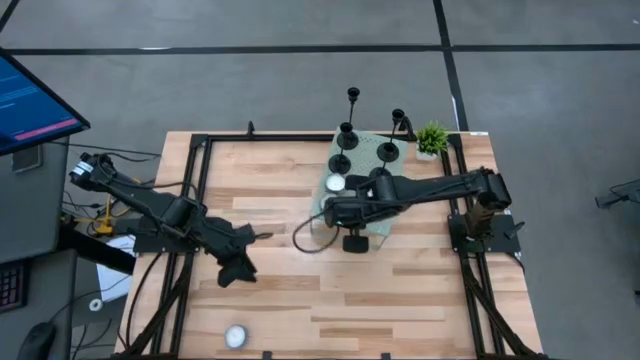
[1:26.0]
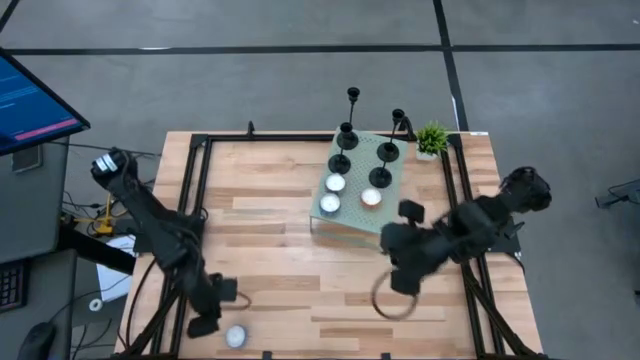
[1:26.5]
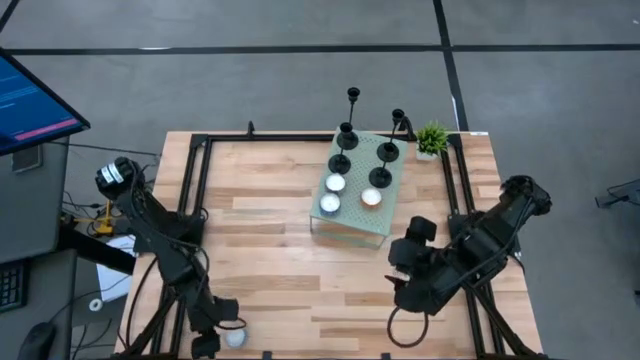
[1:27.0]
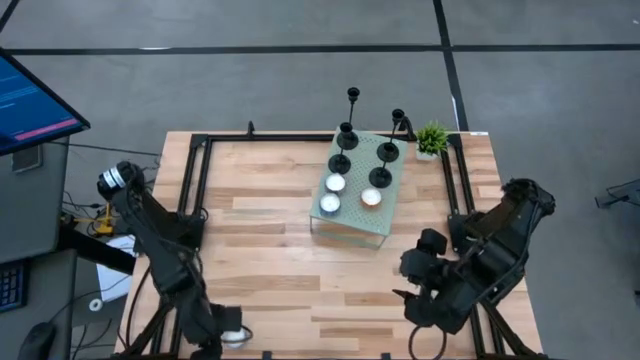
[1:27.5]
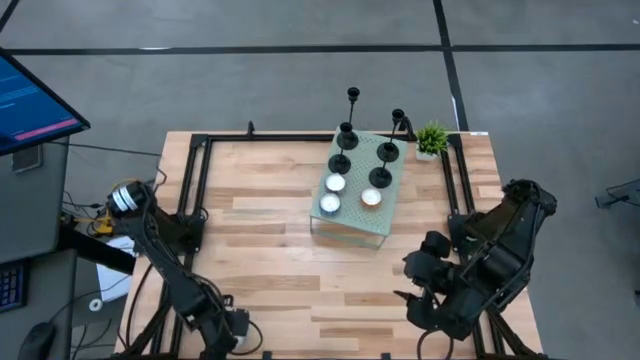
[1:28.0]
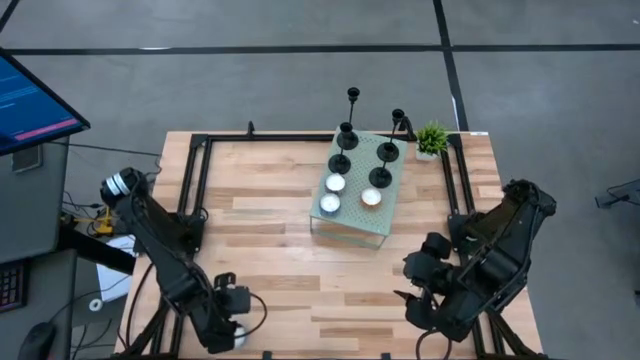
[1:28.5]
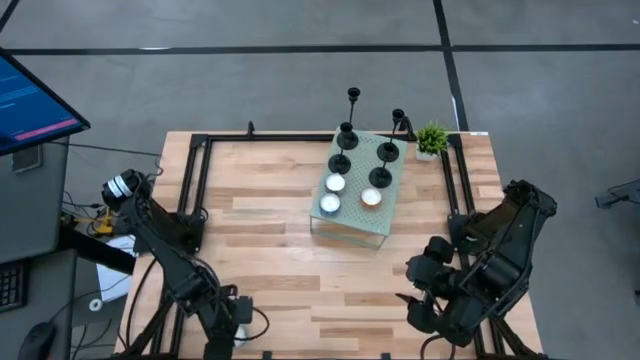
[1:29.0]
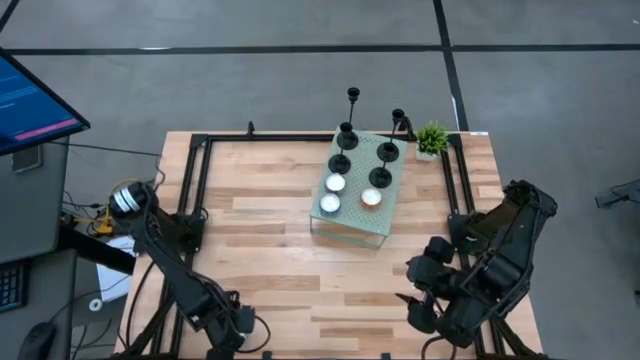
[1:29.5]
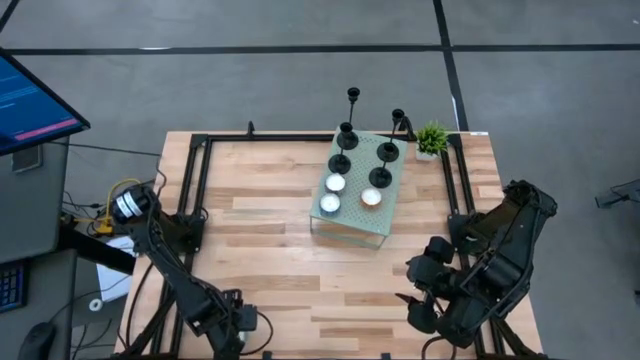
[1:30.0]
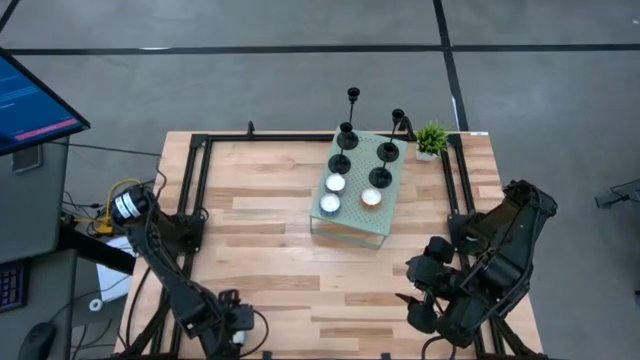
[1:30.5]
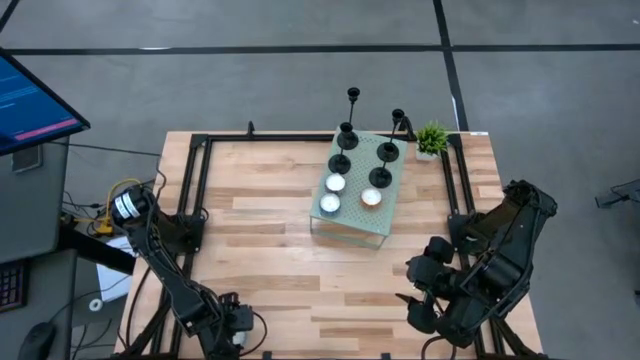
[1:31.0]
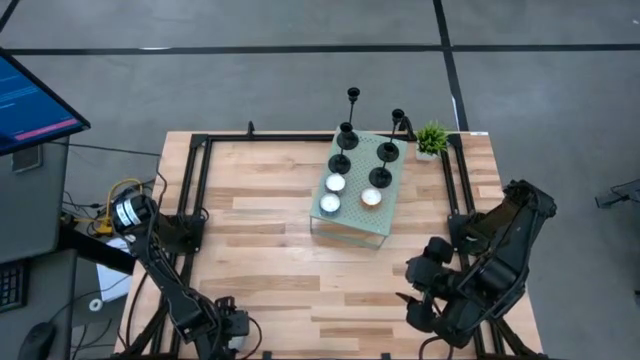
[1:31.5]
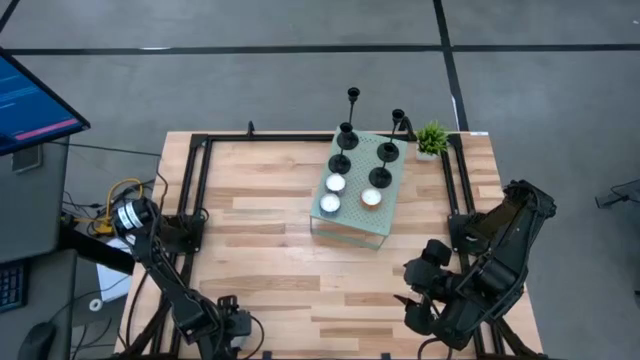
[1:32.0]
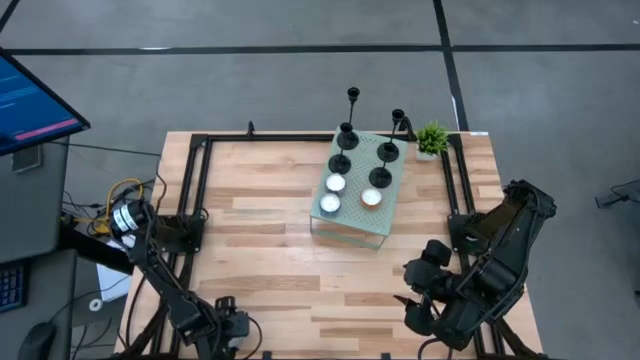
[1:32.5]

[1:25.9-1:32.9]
Task: Pick & Place candle stick holders
Put the light blue patterned scented candle on the shelf

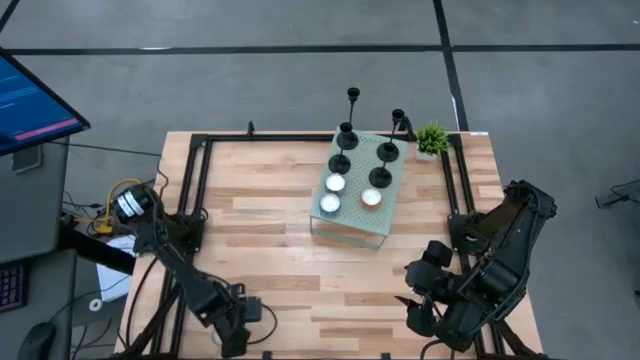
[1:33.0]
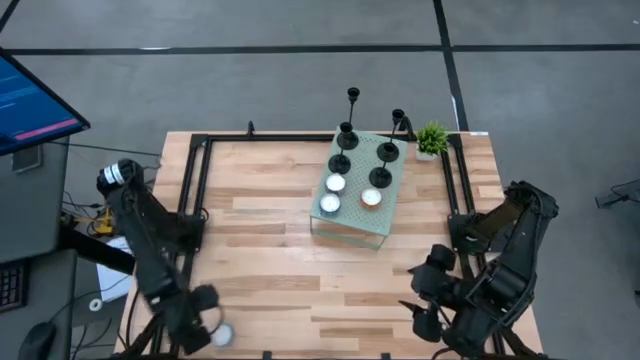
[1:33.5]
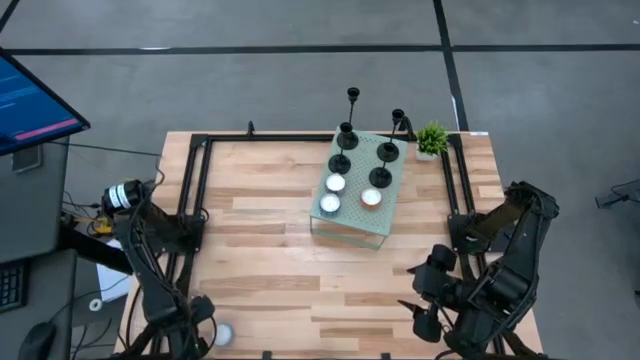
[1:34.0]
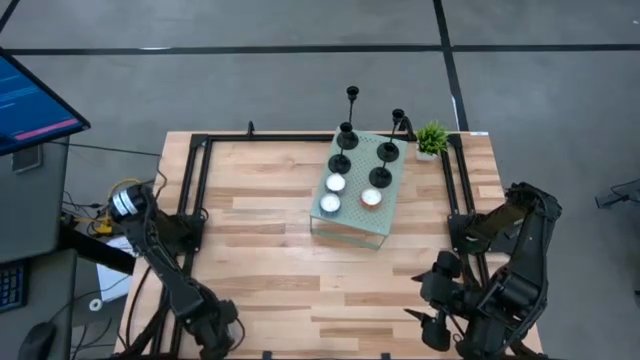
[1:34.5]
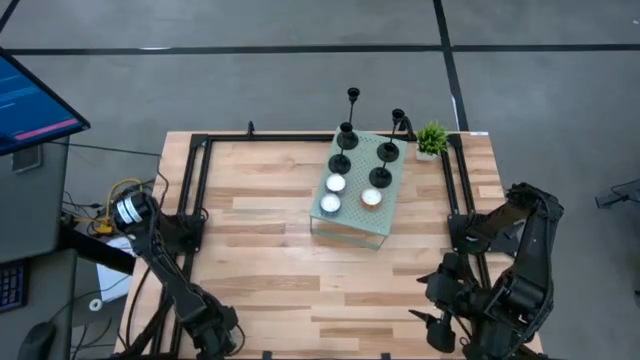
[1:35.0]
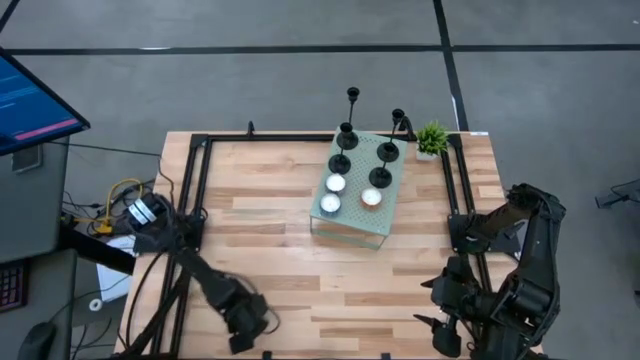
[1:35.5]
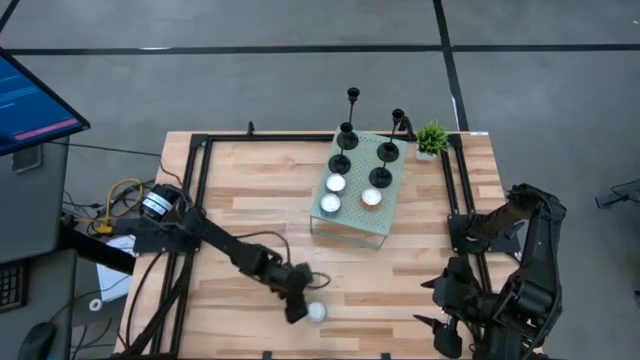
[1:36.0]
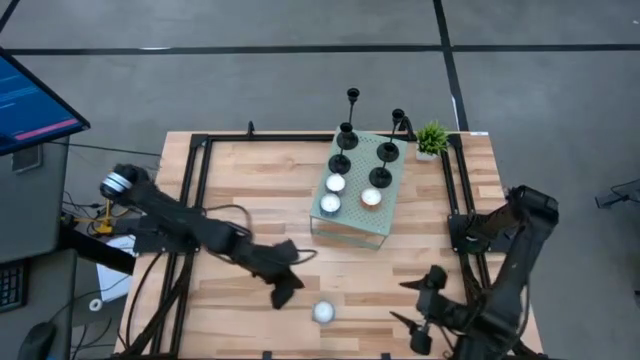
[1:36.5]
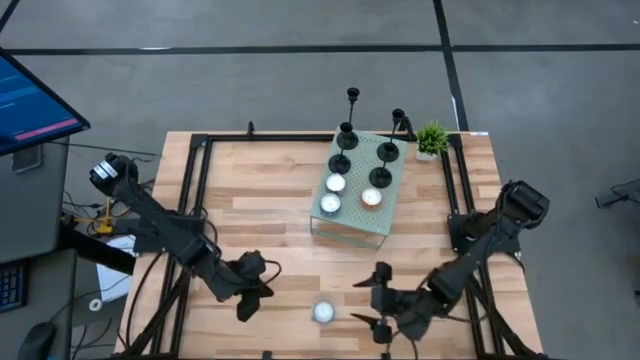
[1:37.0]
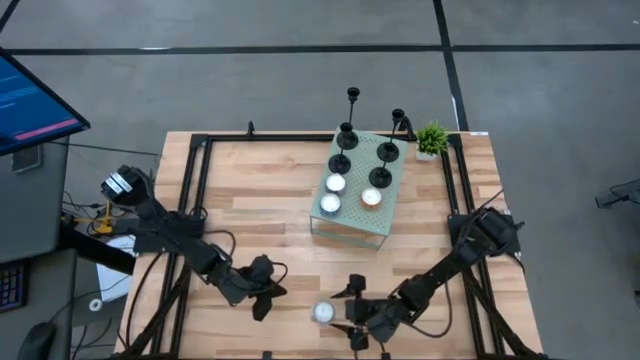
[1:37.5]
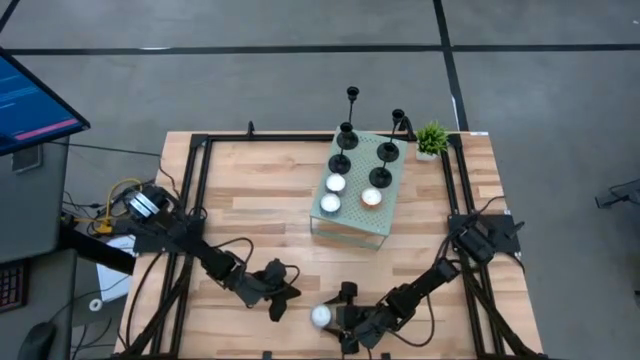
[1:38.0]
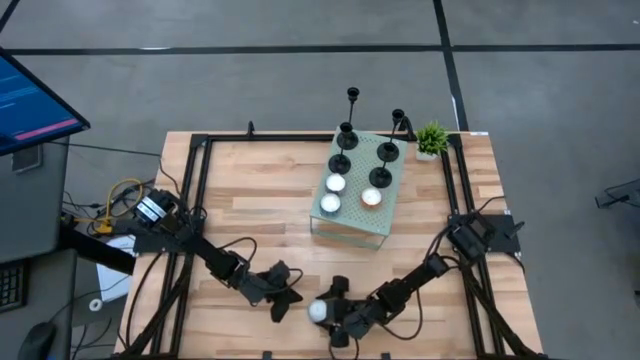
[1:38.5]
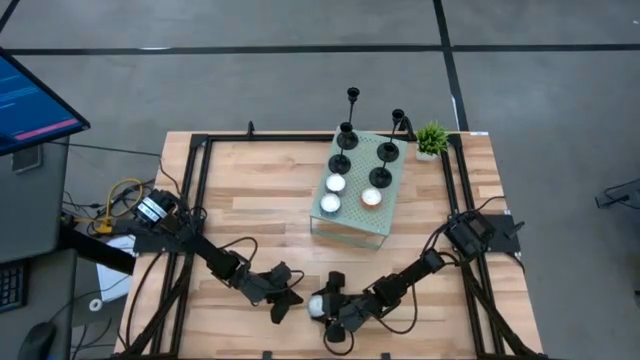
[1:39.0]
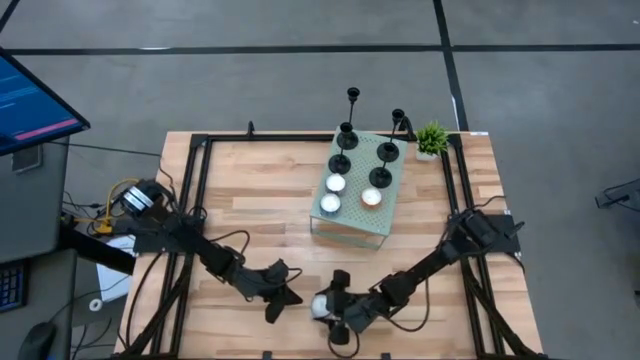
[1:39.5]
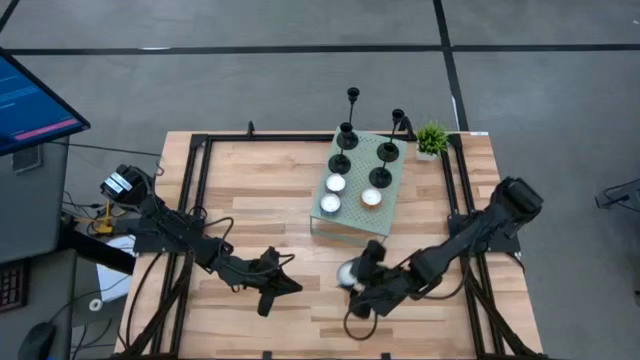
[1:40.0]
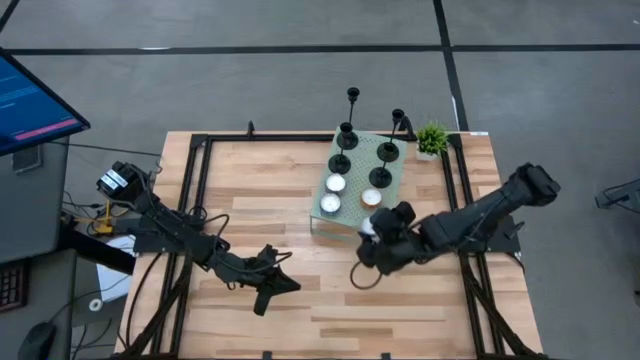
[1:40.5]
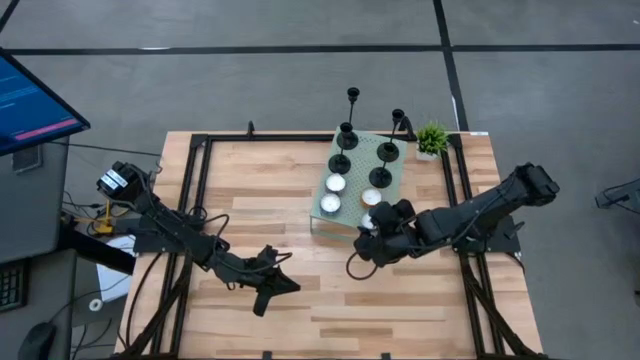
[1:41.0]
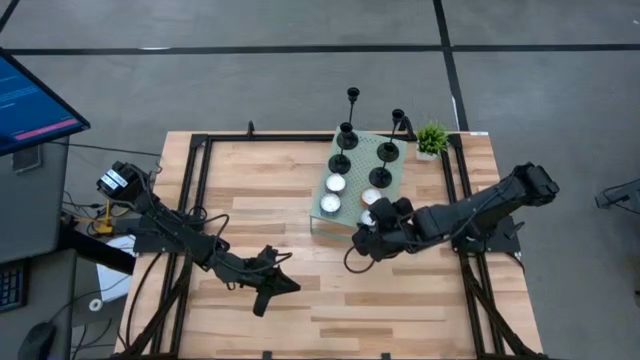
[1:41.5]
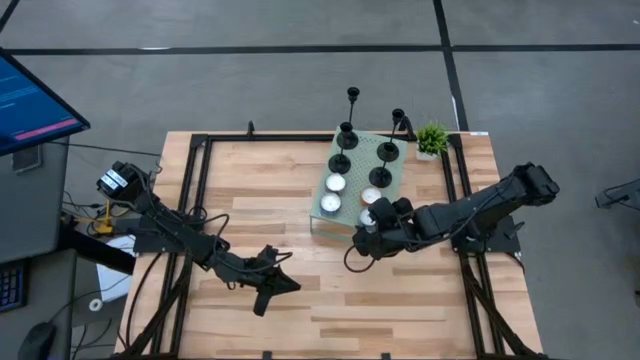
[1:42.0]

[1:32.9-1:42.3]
Put the light blue patterned scented candle on the shelf

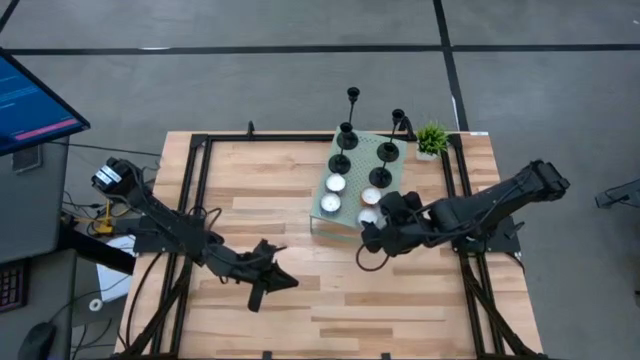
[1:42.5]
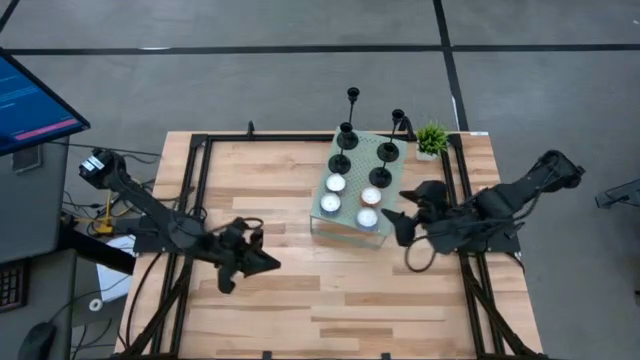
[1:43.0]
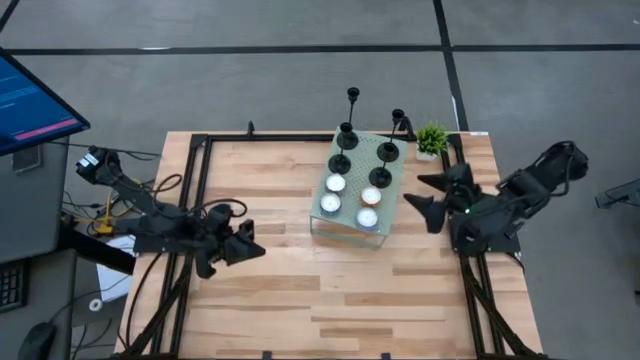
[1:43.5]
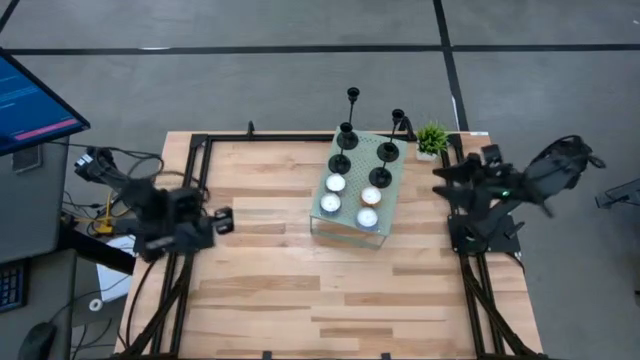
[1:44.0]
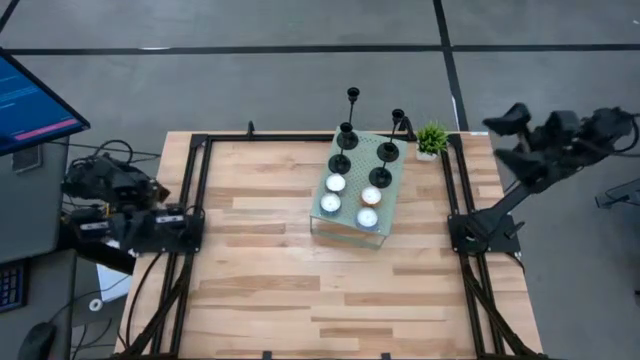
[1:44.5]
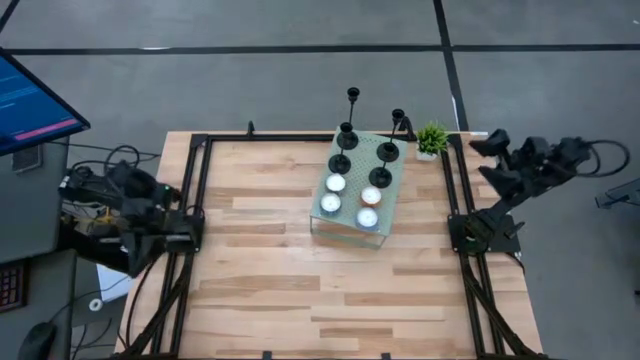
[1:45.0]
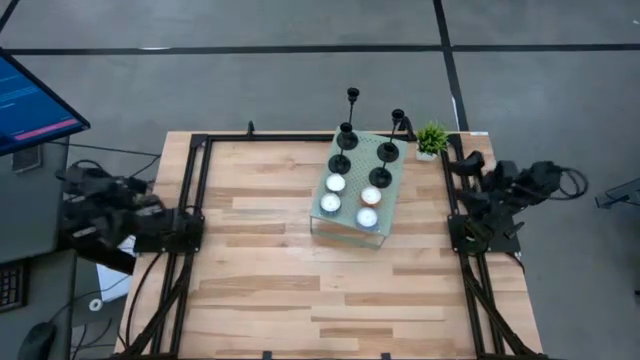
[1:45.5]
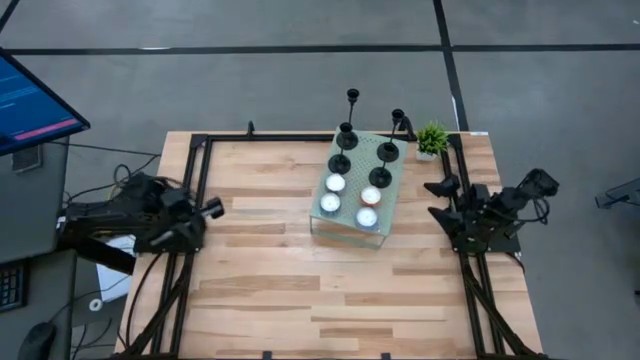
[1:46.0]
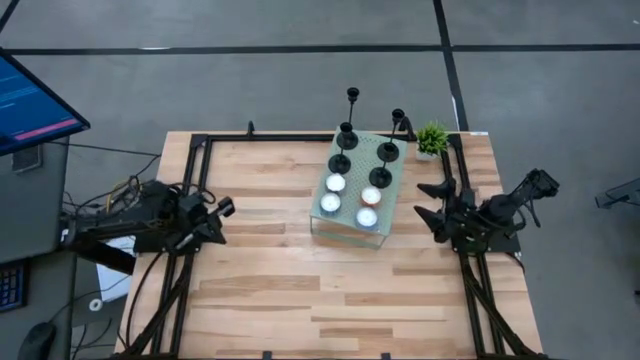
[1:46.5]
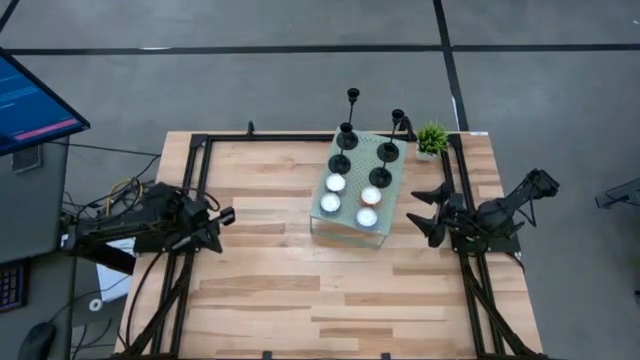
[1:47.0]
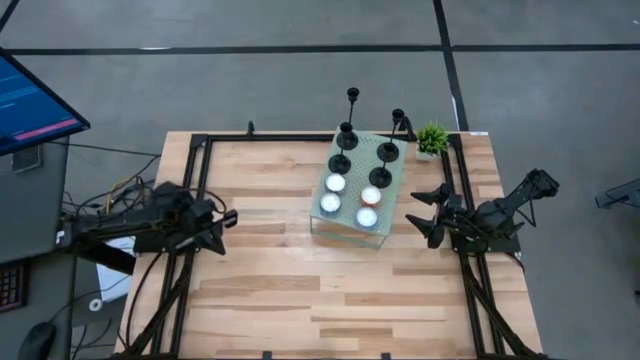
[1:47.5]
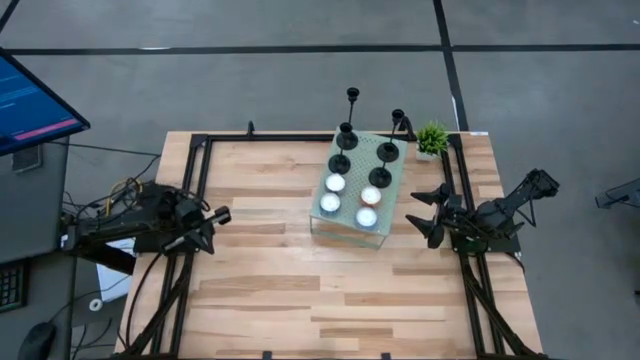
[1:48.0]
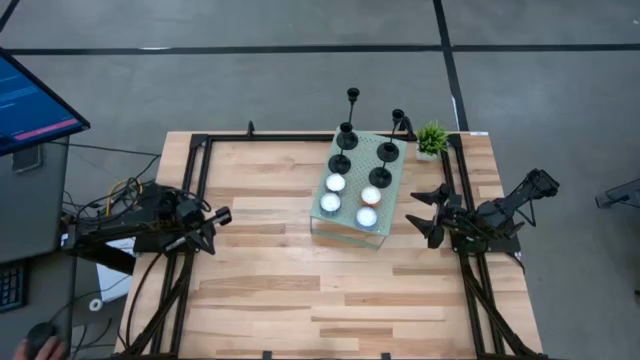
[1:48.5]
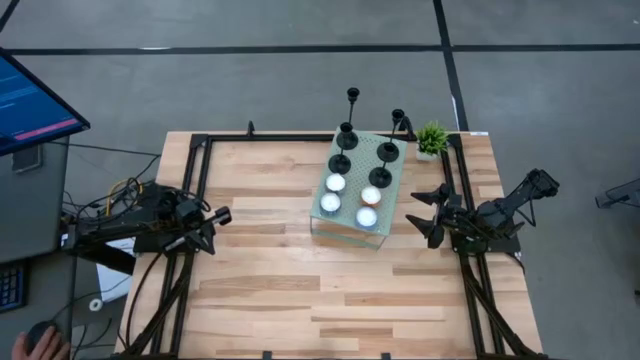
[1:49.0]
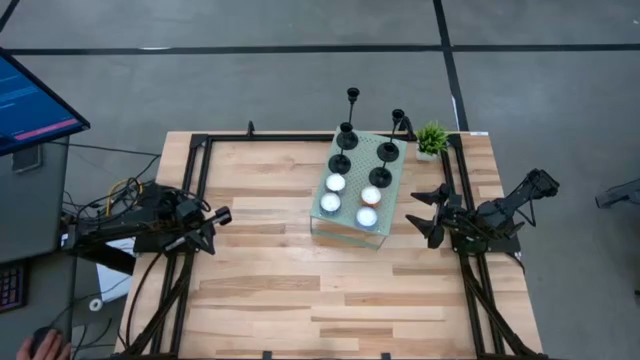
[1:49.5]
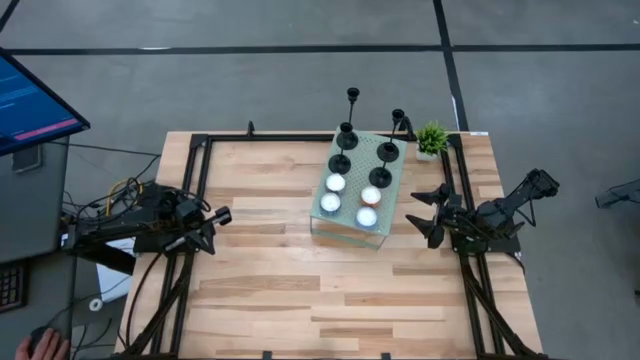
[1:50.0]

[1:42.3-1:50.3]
Return to Home Position
